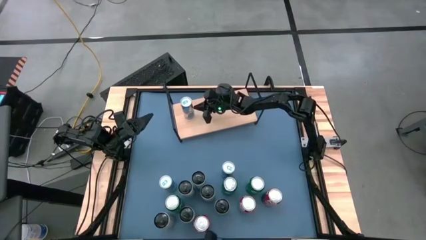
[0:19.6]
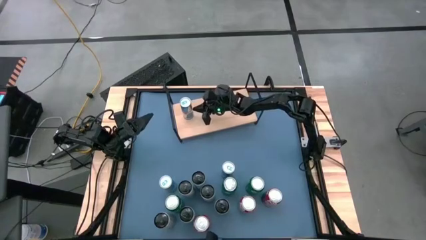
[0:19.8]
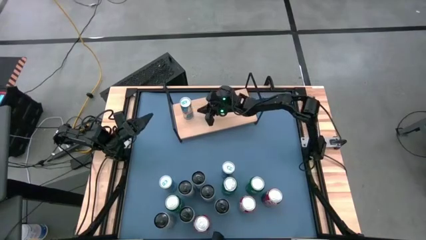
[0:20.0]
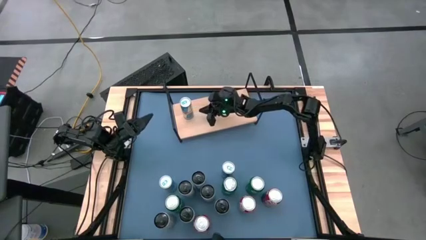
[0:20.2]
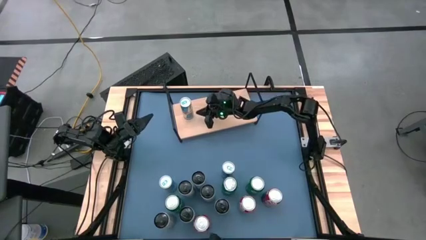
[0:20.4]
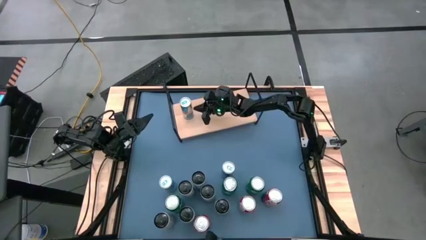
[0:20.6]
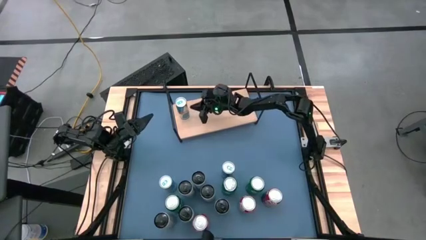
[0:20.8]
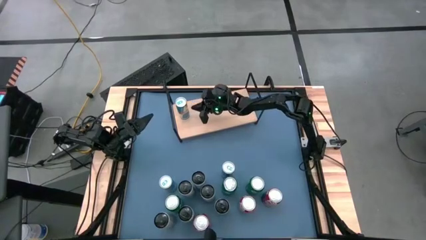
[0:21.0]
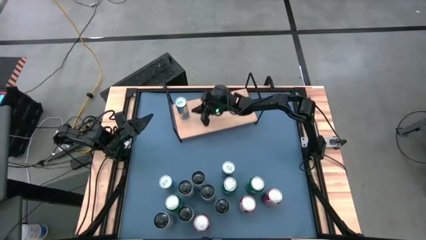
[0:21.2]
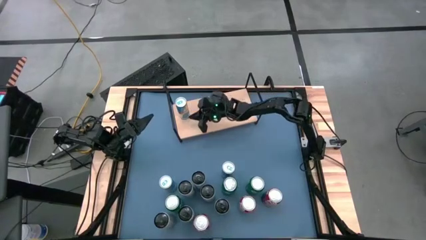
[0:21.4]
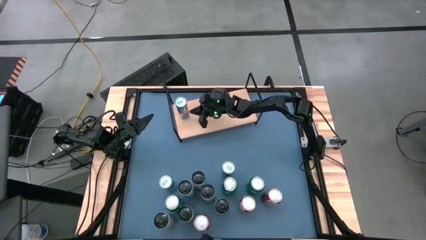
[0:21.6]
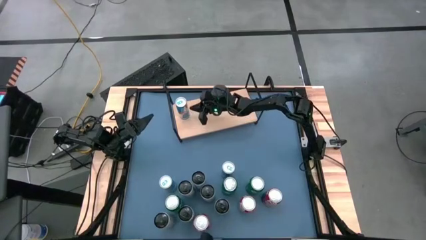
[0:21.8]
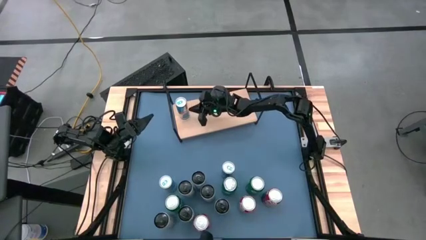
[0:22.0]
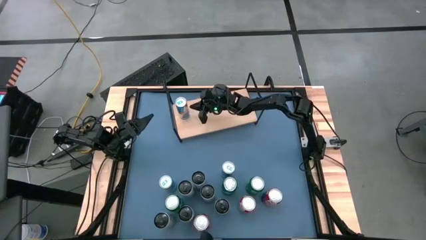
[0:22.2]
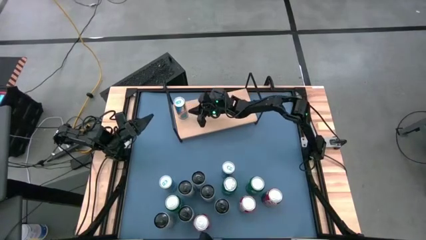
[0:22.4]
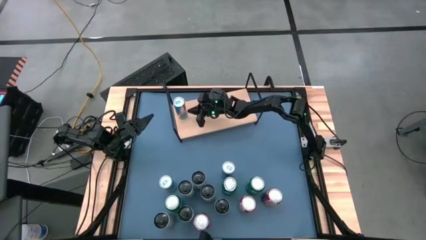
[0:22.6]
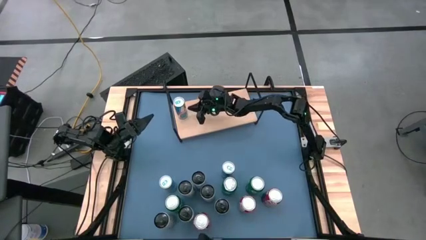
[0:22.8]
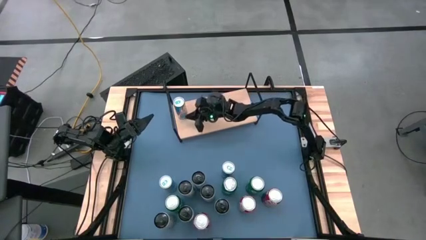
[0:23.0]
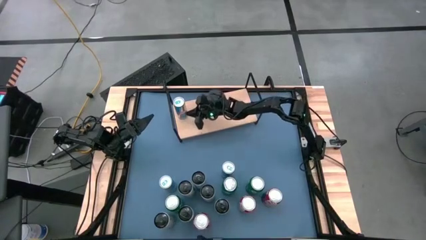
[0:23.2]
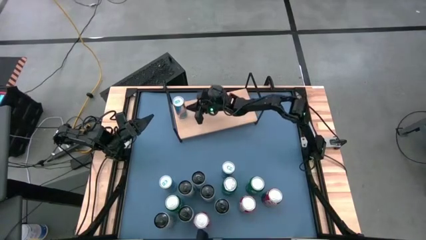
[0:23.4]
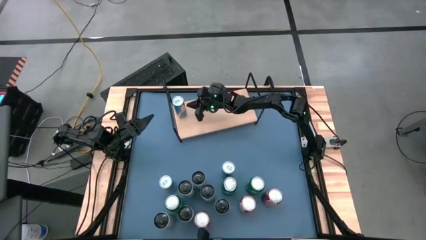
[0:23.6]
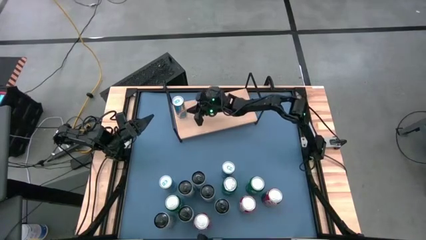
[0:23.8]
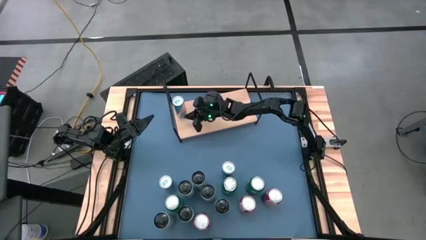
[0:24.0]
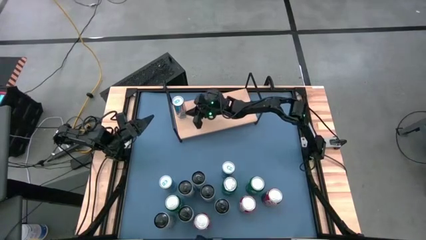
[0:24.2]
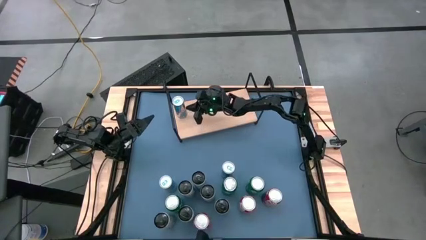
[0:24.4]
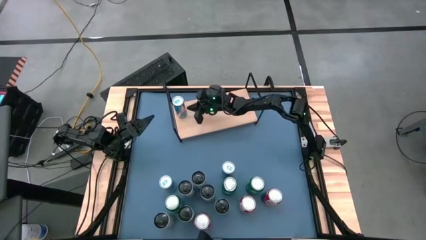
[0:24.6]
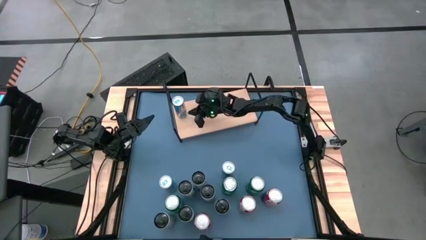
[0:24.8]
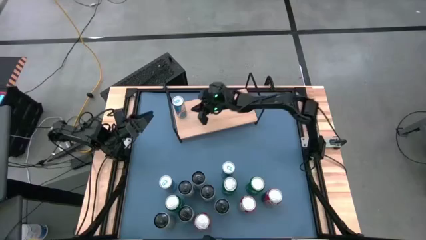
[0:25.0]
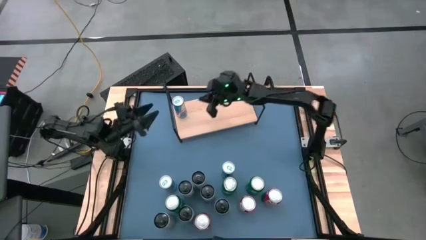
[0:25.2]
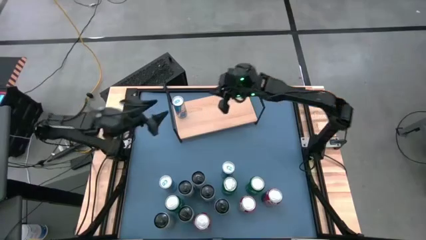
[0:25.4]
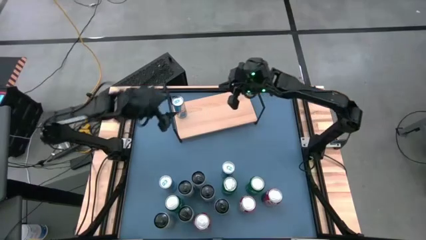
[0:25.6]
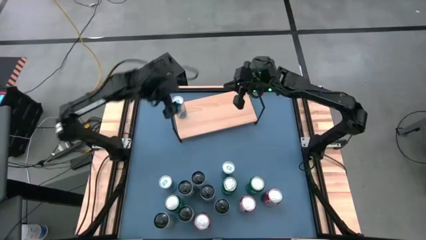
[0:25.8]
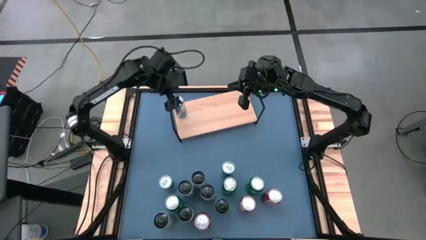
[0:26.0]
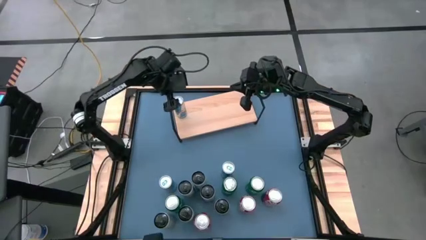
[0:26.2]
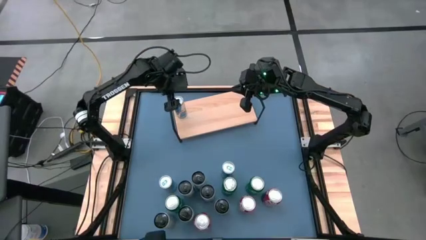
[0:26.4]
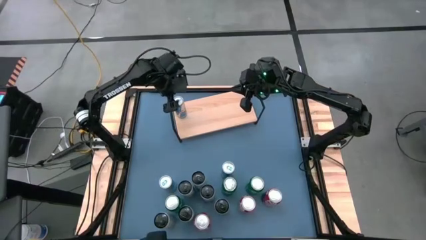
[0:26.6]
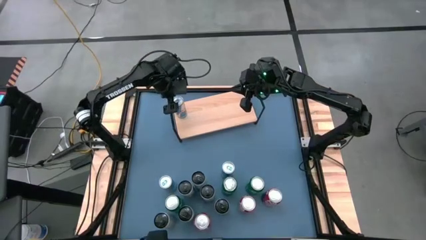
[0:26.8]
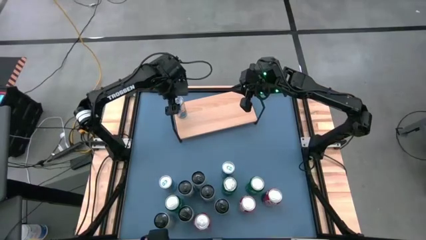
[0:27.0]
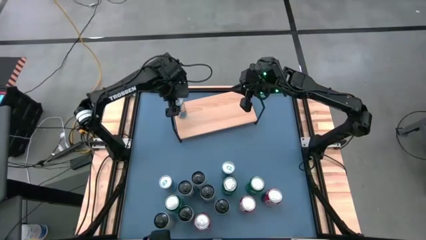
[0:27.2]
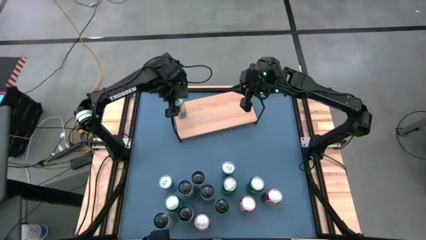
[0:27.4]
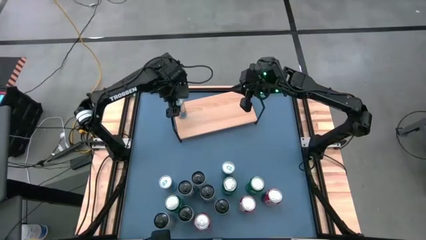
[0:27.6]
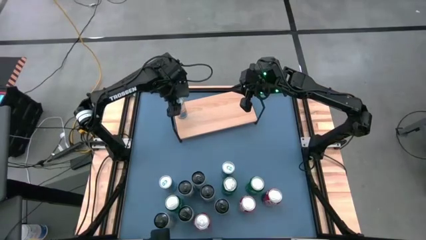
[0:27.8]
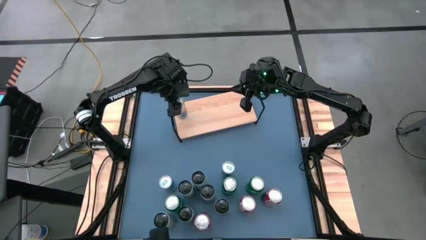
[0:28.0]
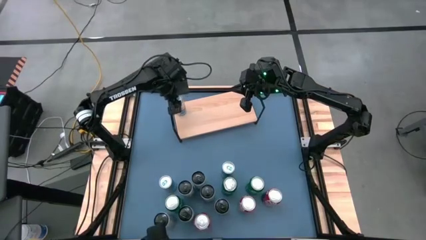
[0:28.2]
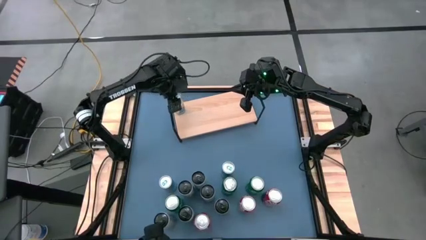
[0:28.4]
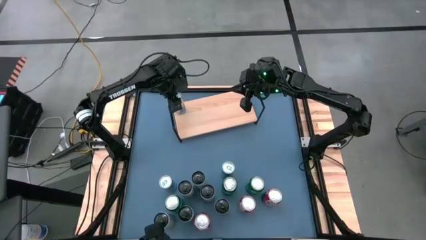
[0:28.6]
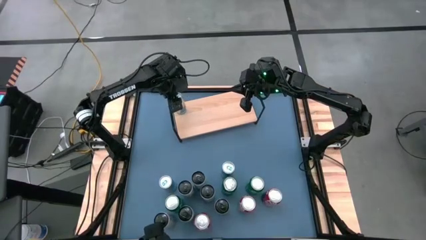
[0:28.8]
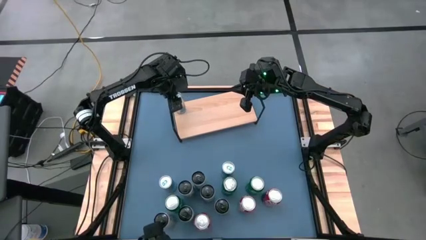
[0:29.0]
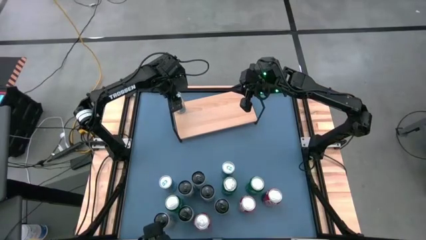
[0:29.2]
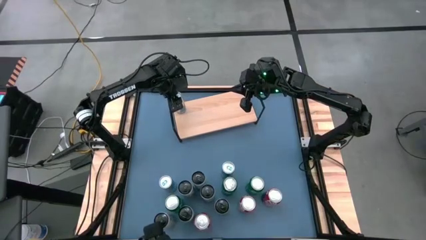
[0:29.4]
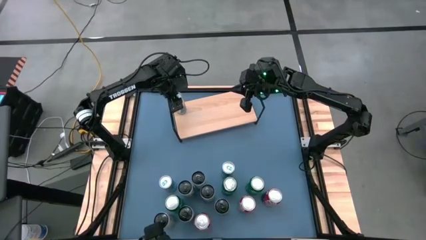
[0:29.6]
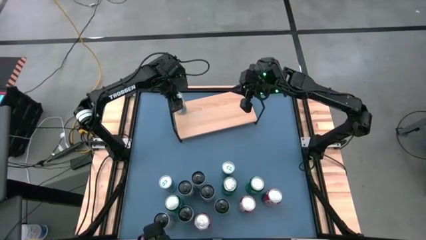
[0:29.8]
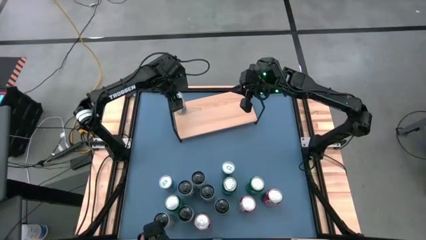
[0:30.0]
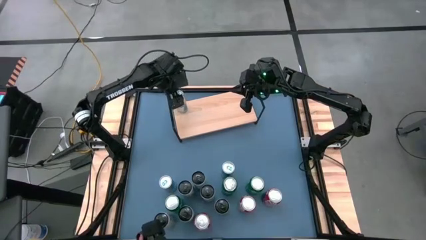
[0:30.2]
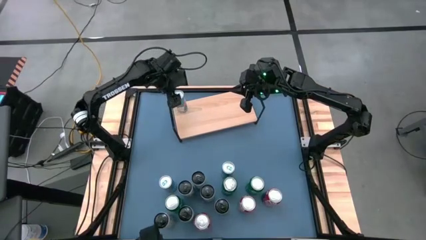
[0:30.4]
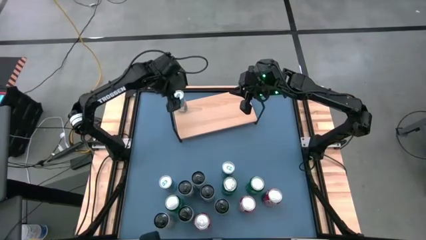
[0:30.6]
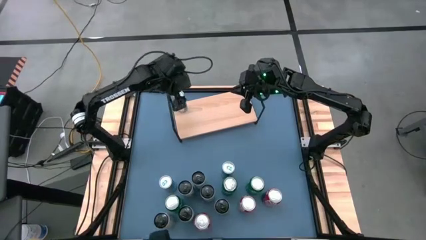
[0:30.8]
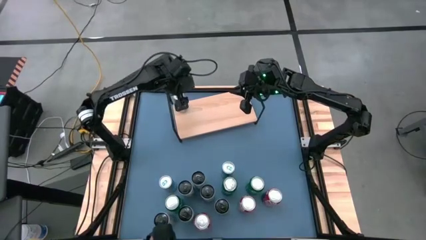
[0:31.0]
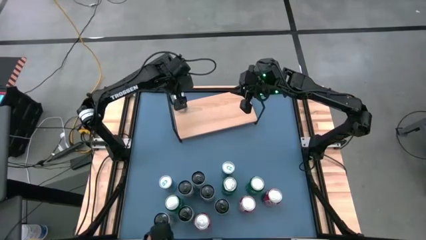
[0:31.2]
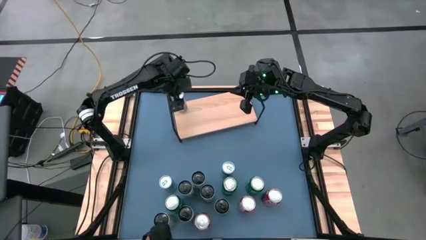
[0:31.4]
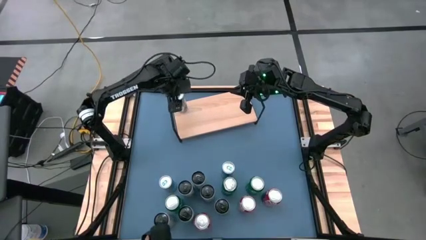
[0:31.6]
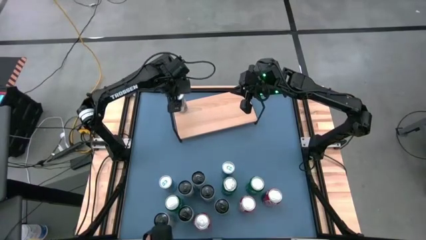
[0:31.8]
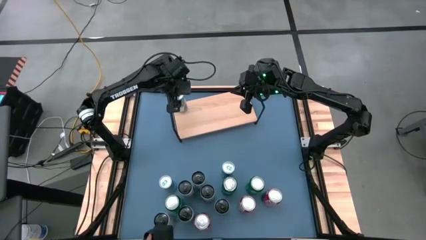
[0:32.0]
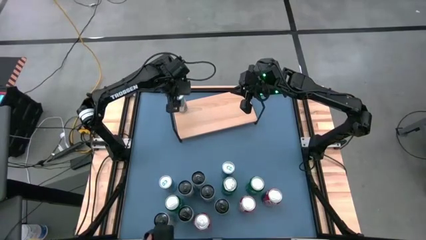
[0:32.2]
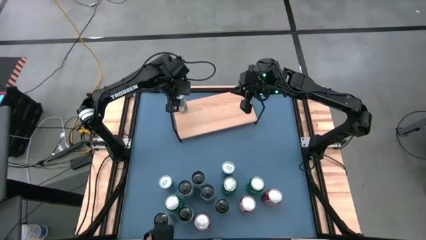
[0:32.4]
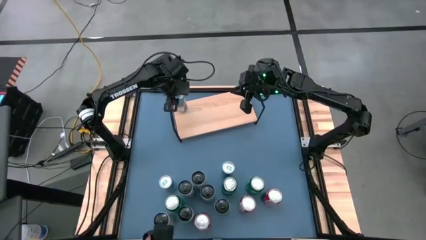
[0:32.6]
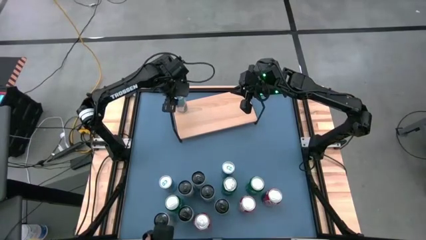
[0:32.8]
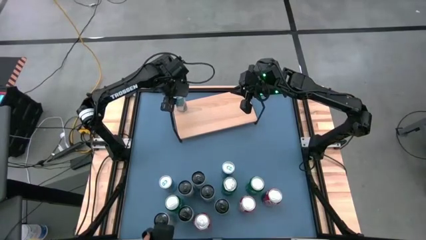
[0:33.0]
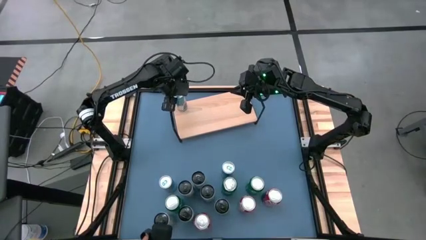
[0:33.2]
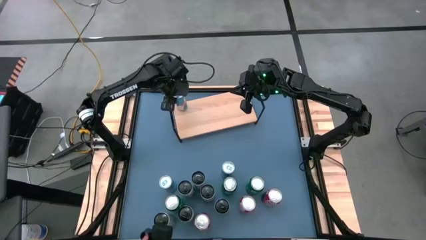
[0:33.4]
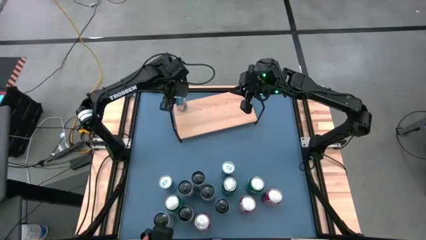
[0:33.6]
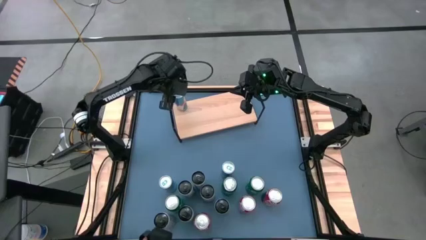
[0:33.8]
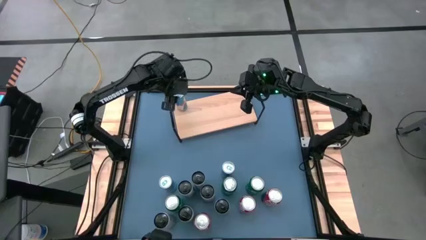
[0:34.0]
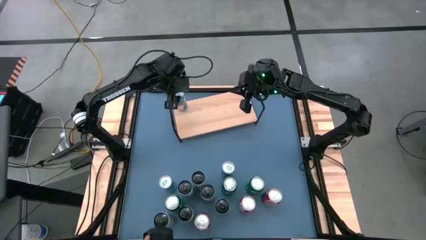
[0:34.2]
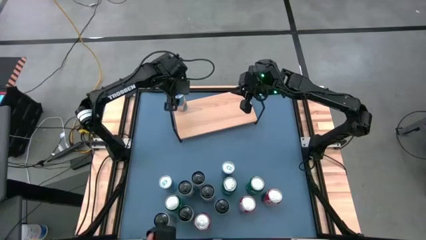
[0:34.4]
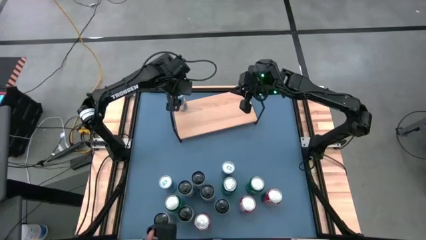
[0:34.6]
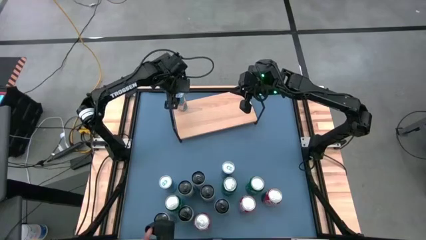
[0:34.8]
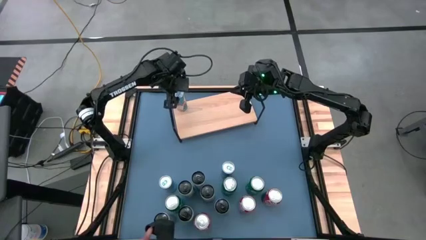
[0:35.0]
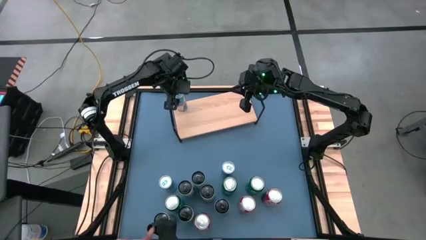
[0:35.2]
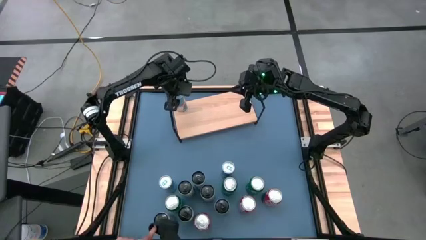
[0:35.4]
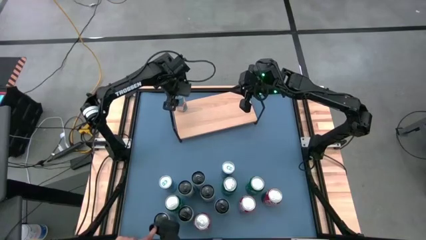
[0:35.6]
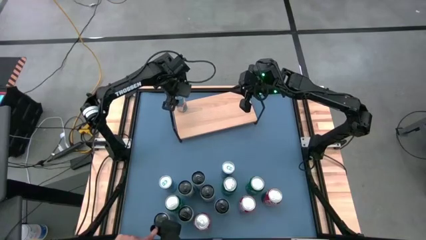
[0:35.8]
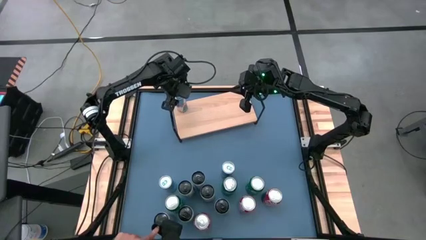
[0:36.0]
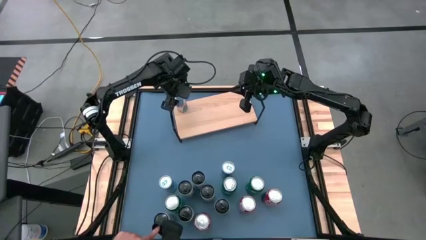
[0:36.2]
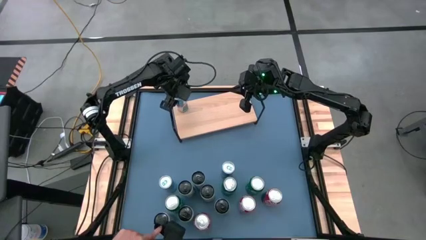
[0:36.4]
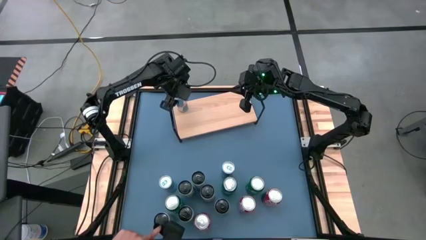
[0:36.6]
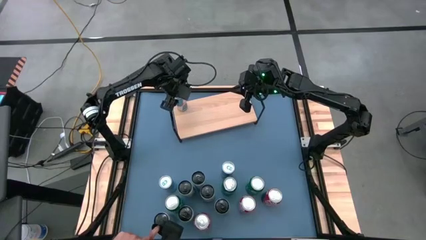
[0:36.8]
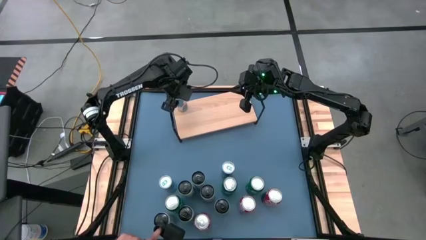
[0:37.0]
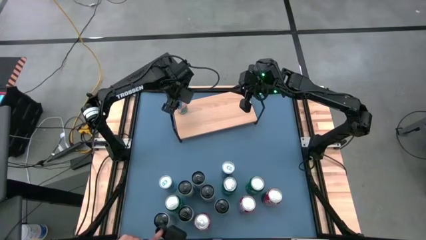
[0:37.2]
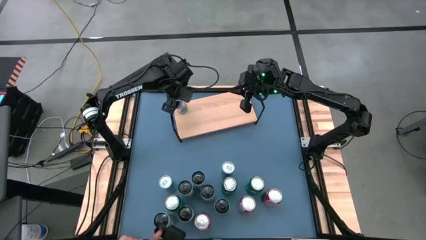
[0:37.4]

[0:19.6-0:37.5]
Task: Place canned beverage on shelf
Put the right blue soda can on the shelf
